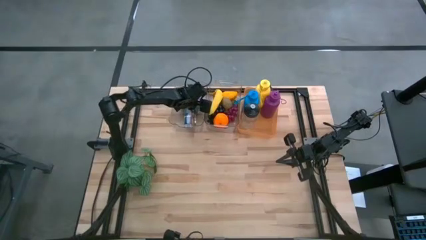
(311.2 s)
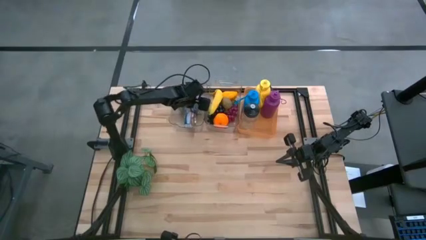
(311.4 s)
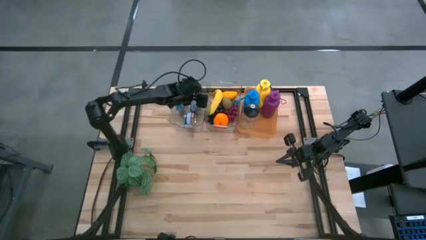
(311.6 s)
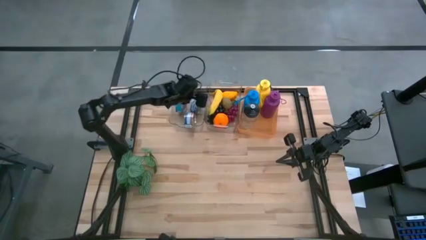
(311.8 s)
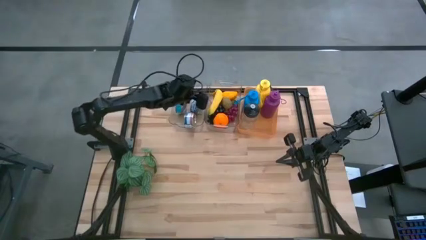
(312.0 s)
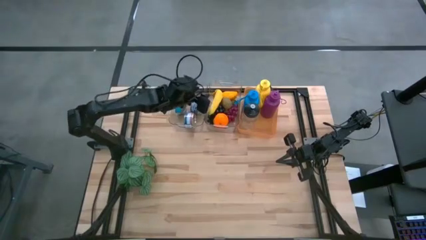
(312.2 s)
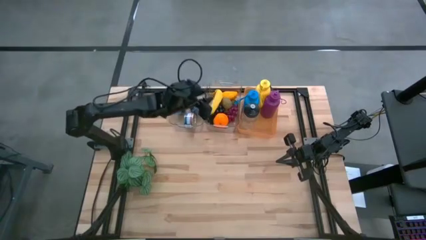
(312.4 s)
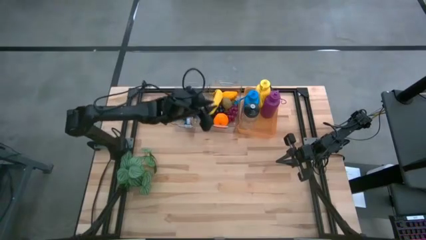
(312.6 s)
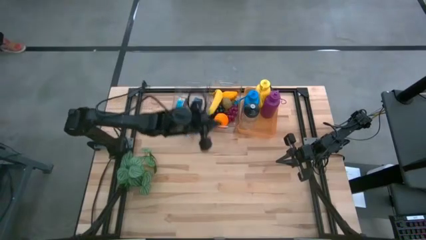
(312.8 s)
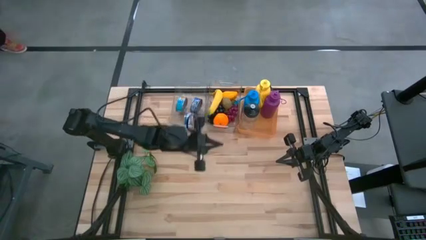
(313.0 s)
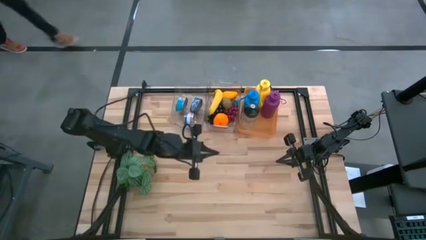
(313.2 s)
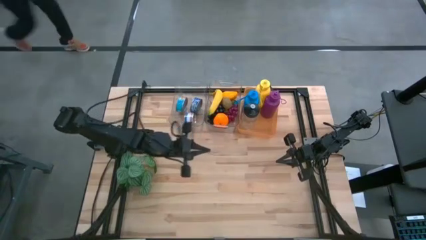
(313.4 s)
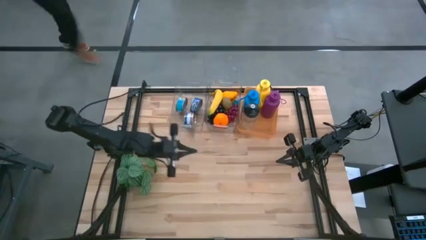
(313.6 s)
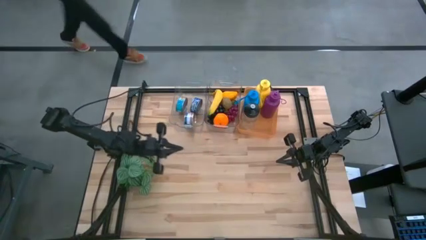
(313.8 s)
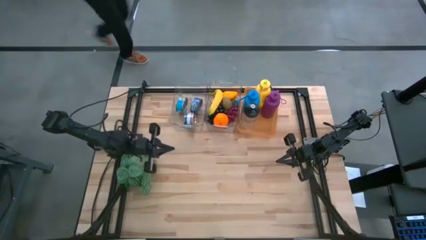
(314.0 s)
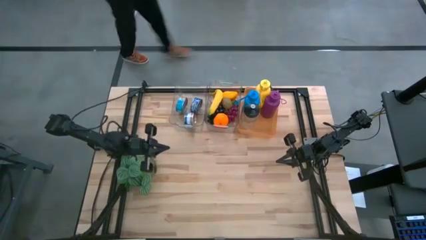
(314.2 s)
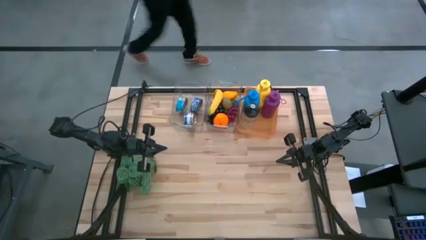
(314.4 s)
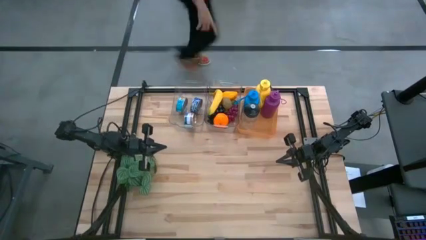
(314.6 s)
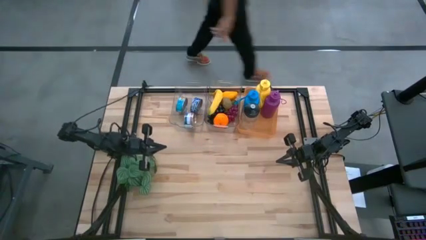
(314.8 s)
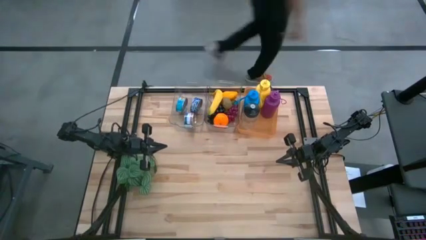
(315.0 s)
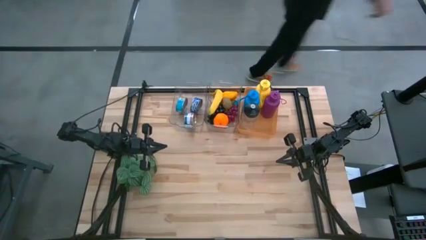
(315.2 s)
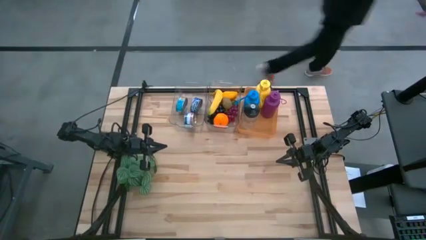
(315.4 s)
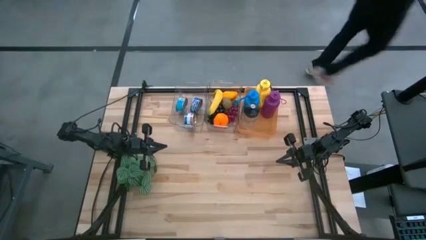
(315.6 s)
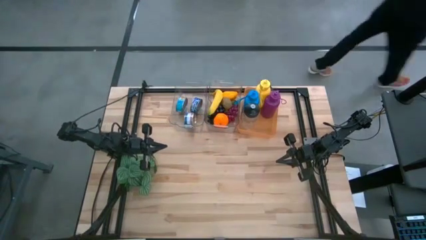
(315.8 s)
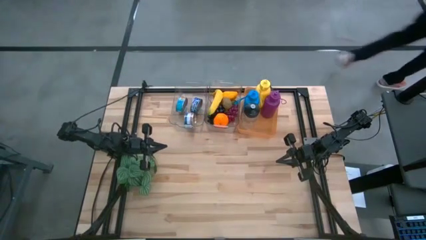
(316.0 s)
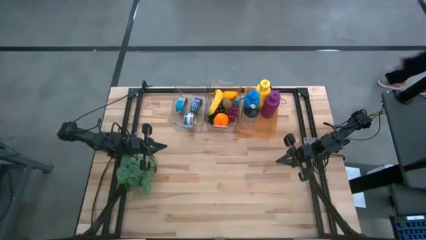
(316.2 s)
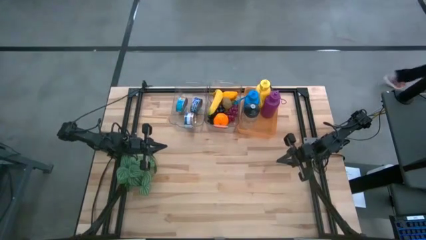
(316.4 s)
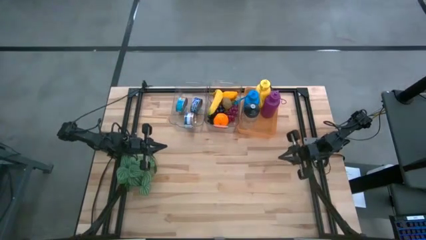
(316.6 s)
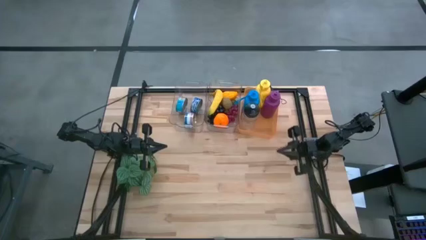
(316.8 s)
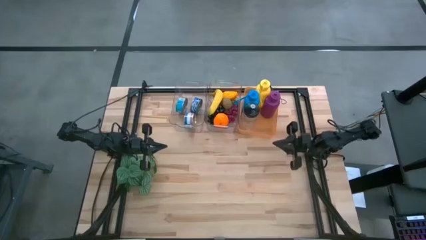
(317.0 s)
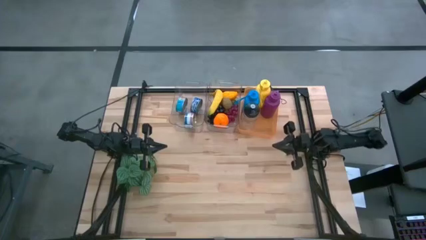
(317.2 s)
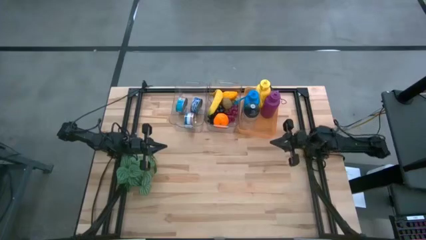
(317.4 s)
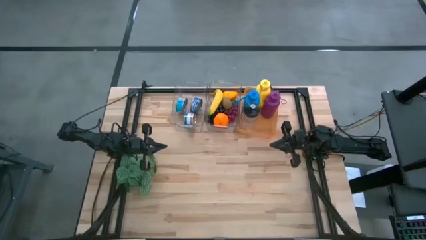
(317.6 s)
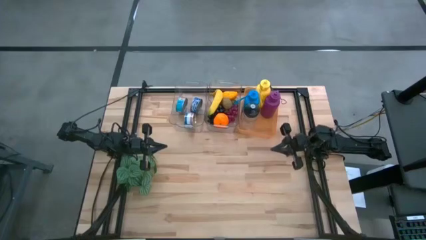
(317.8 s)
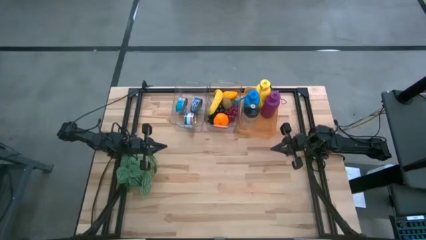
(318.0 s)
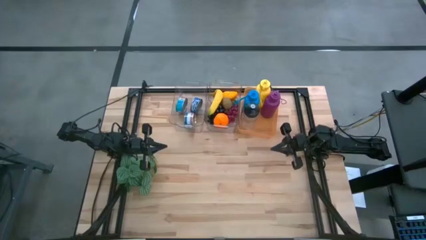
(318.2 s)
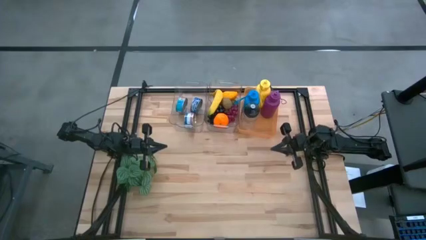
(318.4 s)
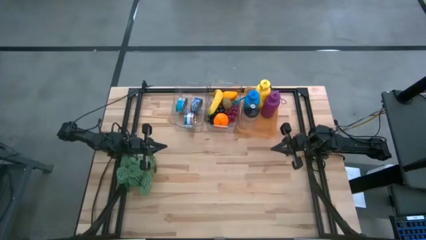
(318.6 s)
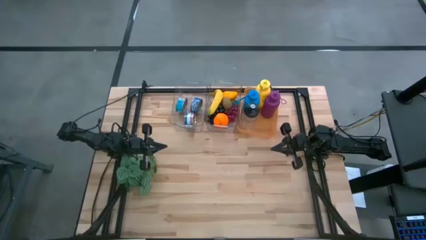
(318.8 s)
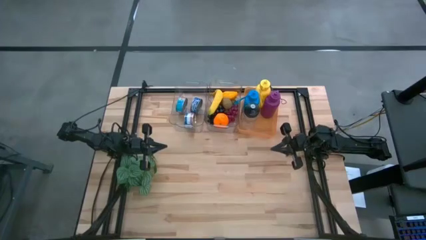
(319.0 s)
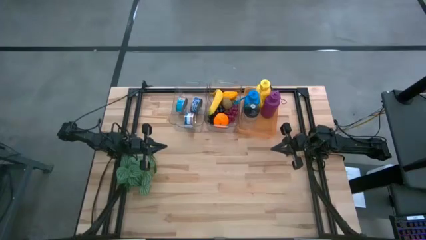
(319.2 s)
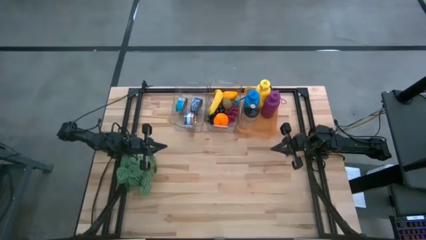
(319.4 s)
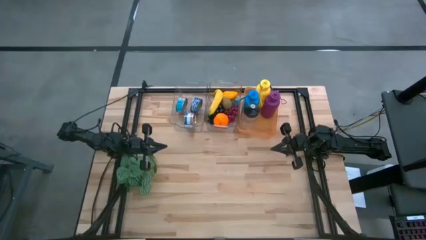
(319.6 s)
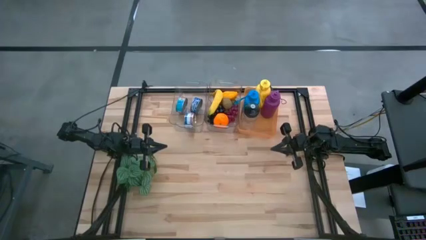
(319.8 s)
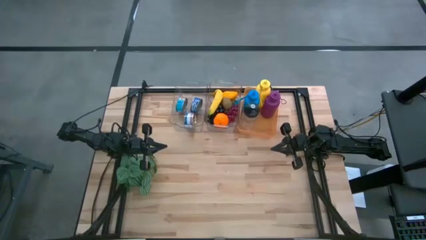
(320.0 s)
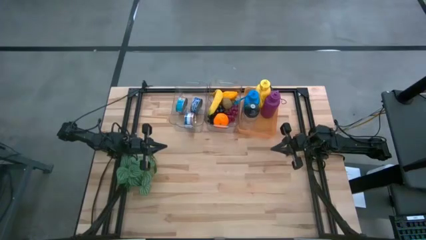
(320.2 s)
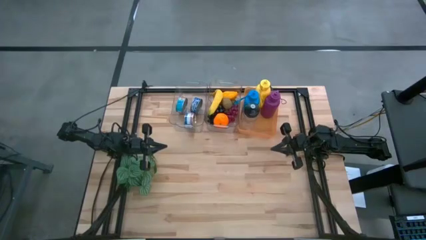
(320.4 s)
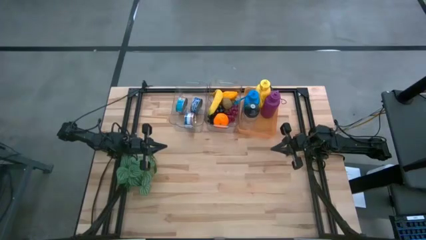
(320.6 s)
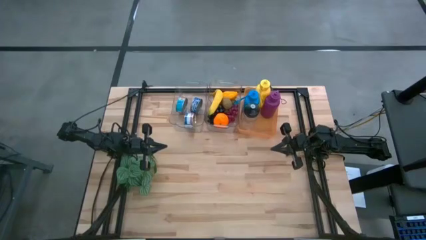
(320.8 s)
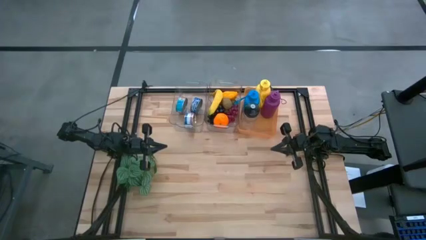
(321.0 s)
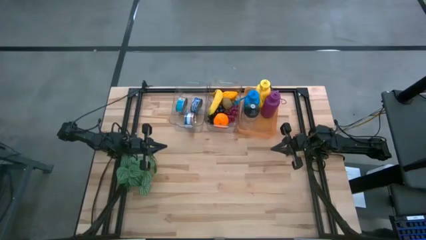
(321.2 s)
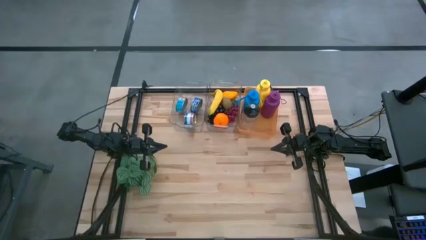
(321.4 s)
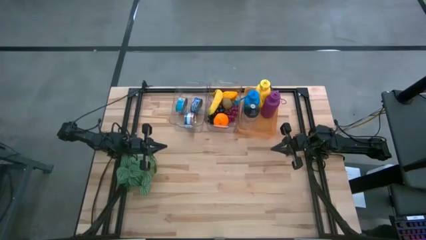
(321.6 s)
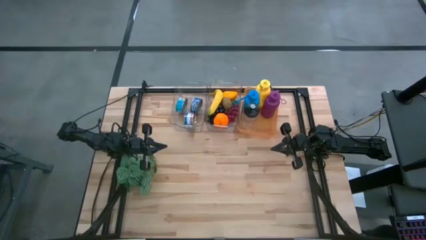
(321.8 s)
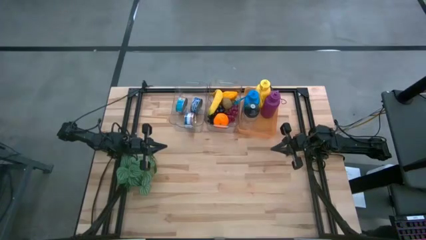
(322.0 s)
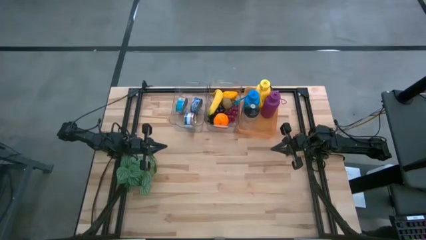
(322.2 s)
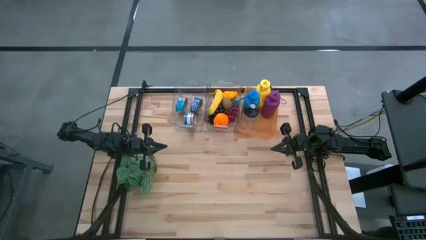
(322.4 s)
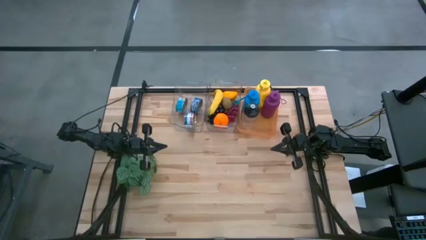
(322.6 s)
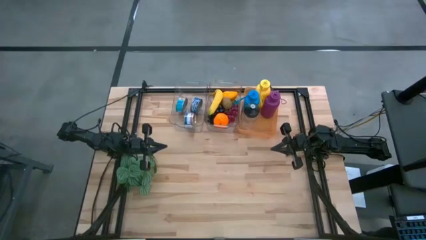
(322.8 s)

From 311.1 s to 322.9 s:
Task: Pick & Place Food Item
Return to Home Position
